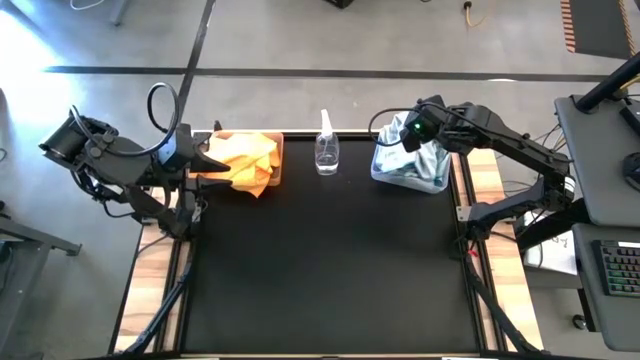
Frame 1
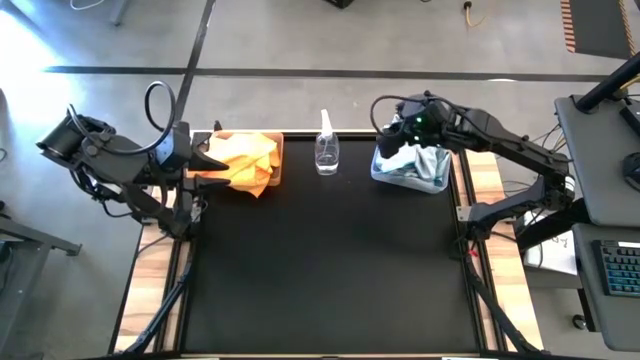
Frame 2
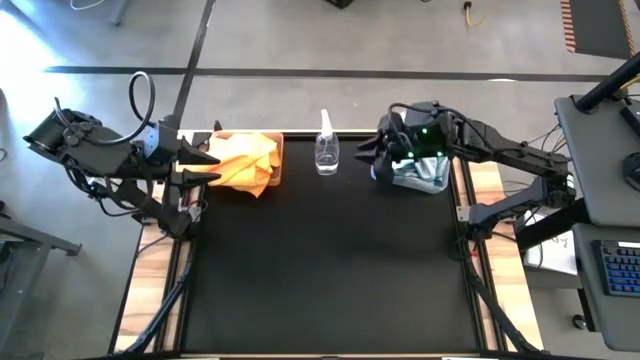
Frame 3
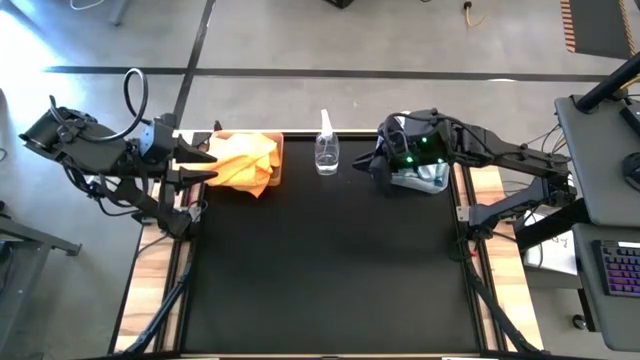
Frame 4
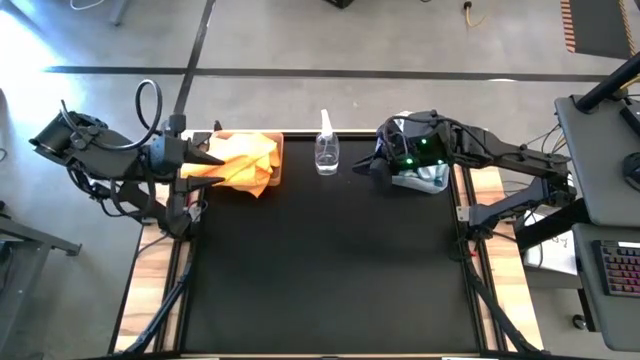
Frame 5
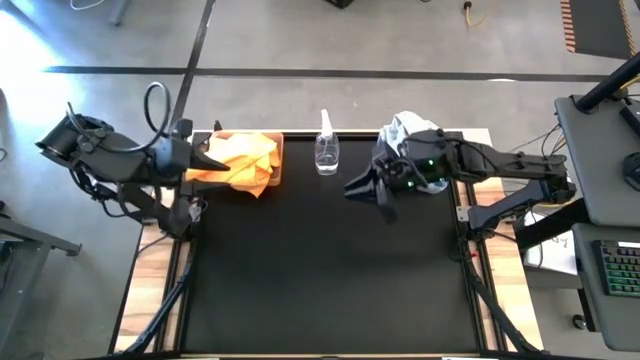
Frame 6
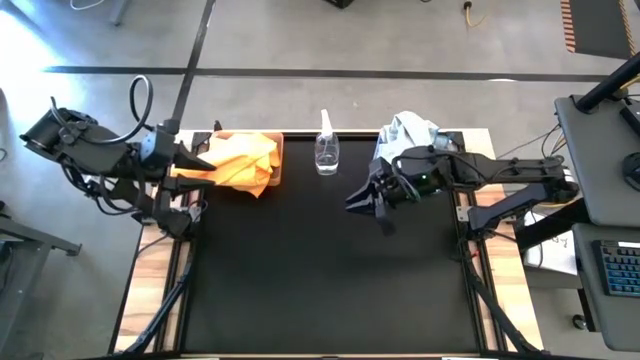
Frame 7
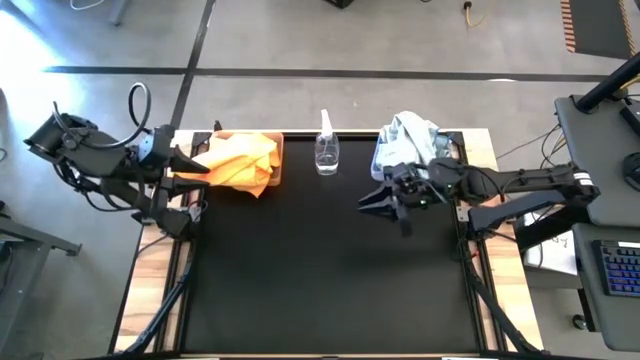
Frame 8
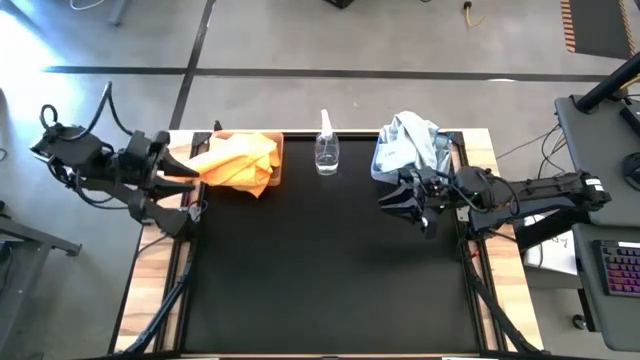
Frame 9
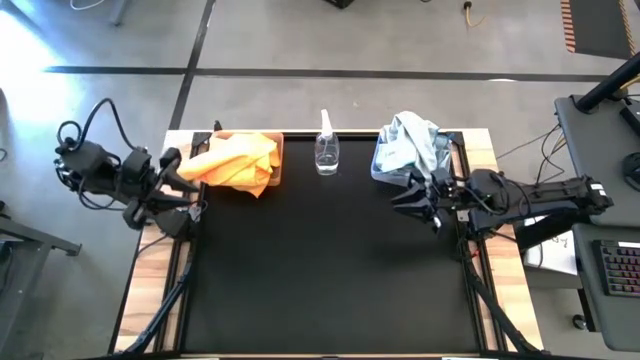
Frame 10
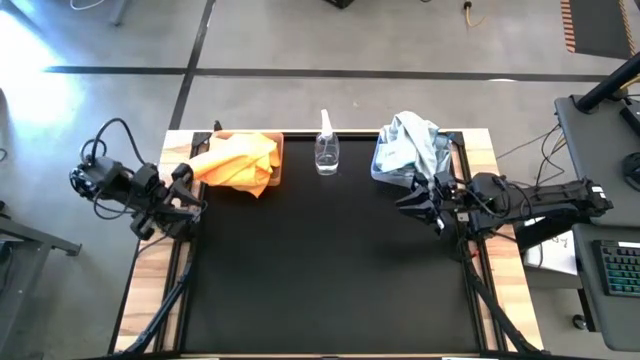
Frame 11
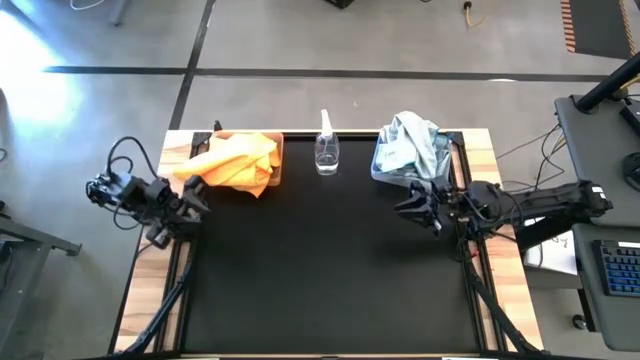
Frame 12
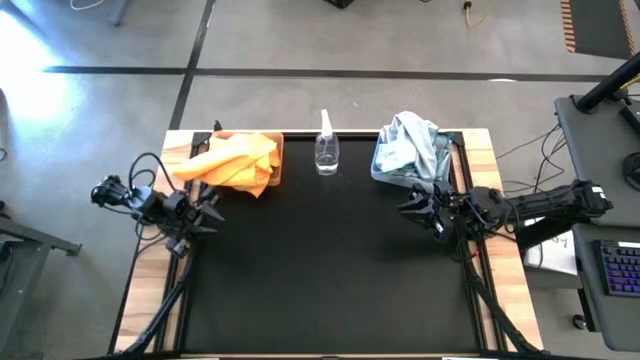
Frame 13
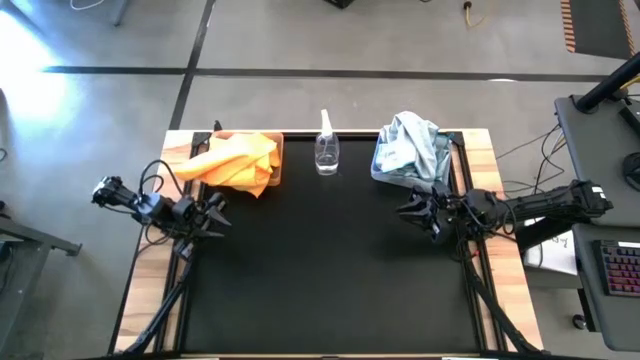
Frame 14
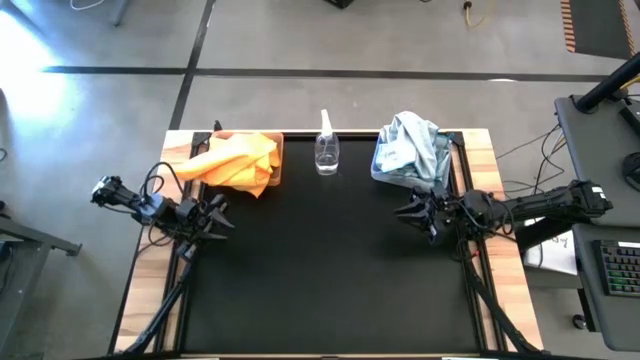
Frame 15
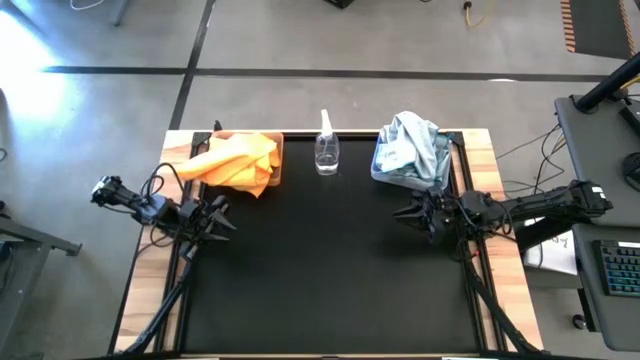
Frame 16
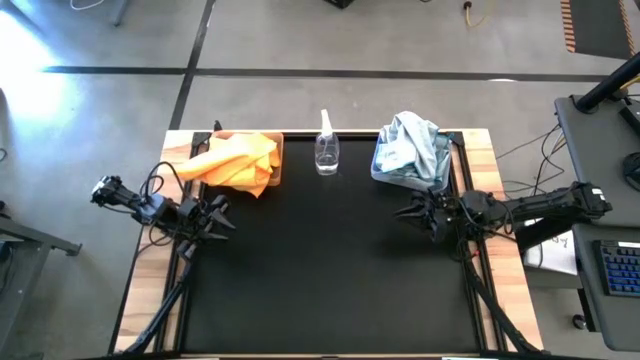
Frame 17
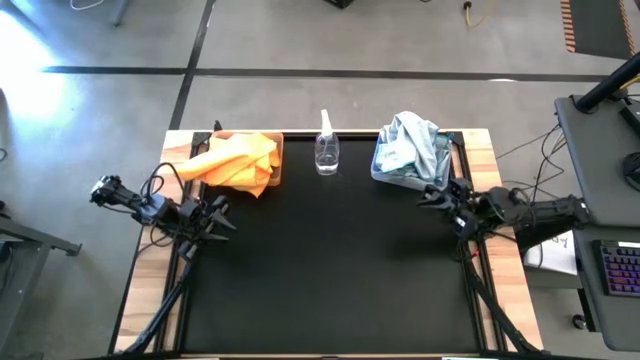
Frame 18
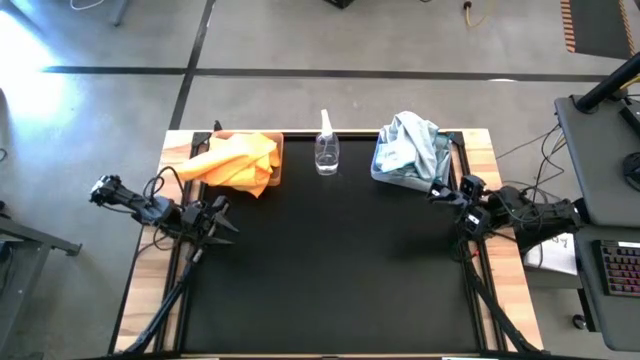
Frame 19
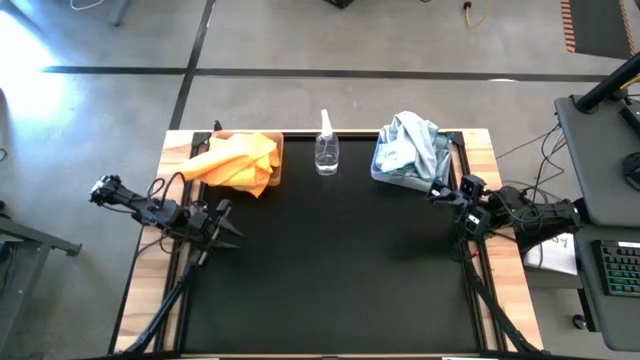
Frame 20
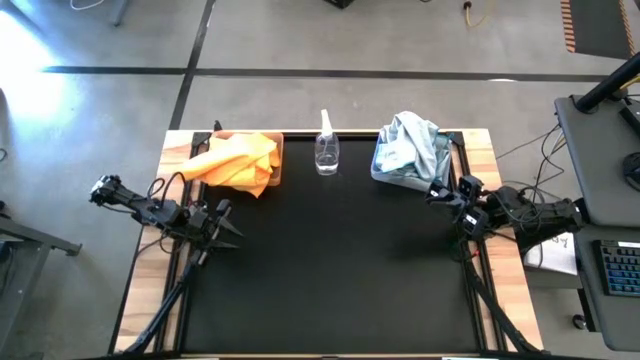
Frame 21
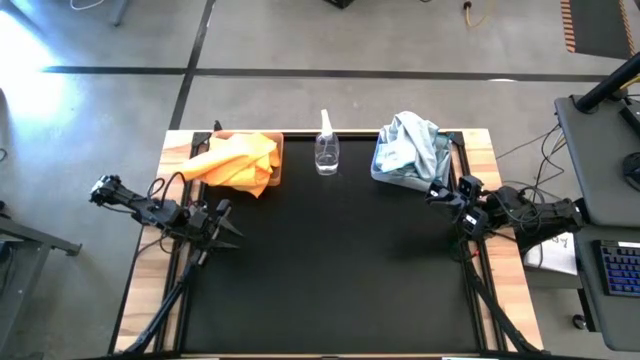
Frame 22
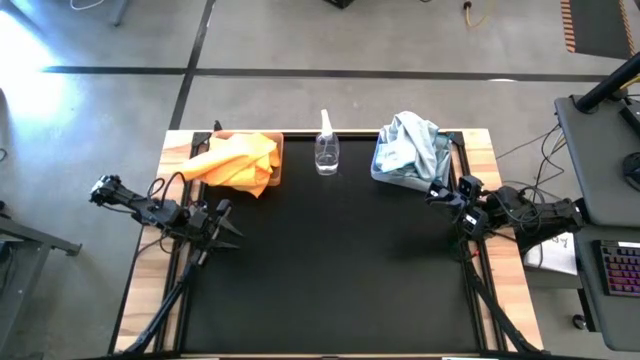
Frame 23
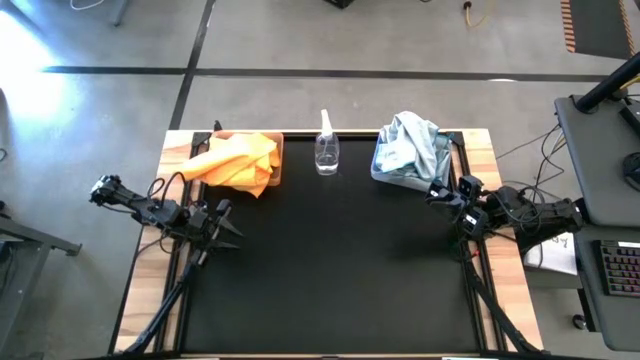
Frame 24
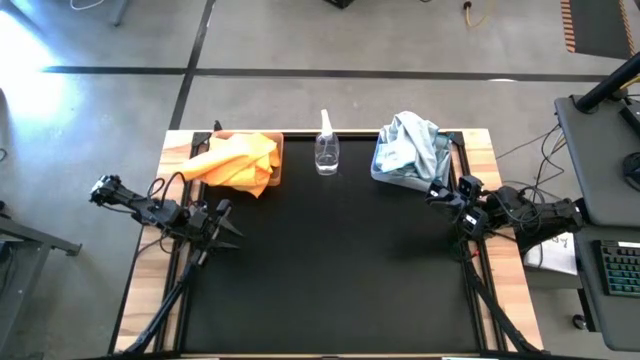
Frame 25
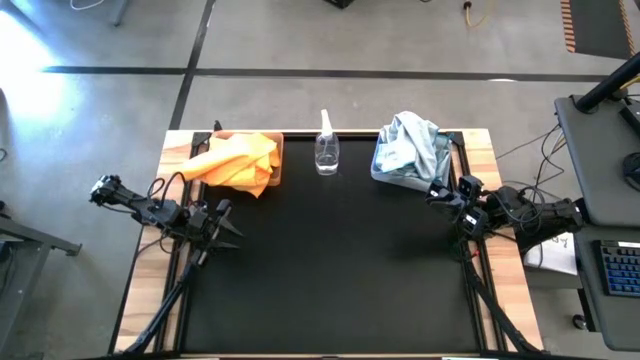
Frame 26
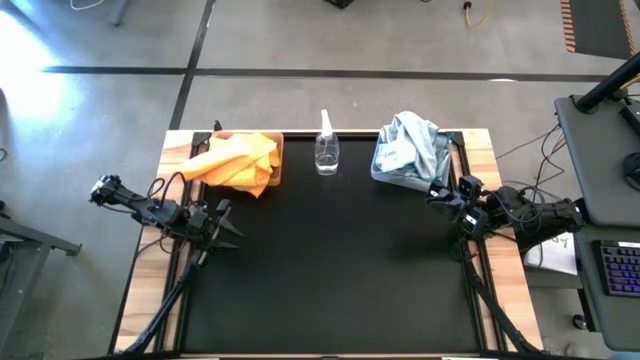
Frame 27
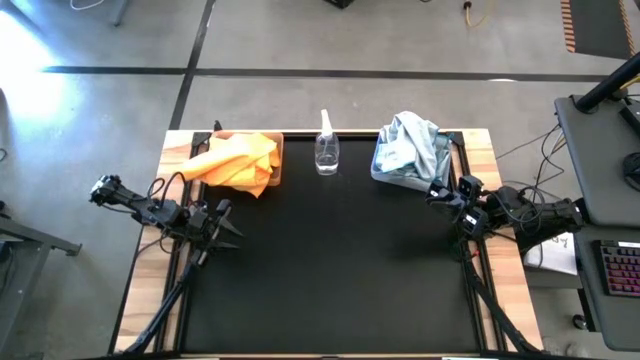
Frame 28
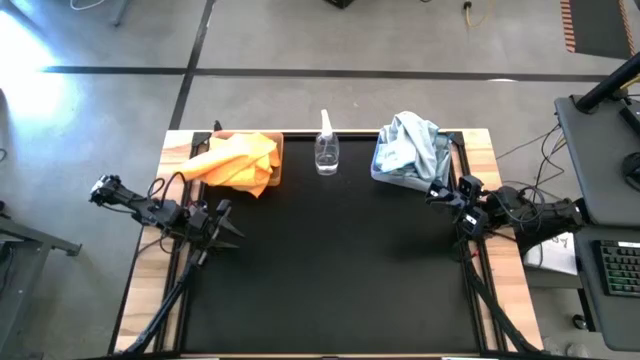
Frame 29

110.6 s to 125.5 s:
Task: Sort microfiber towel by color & place in baskets
Return to Home Position

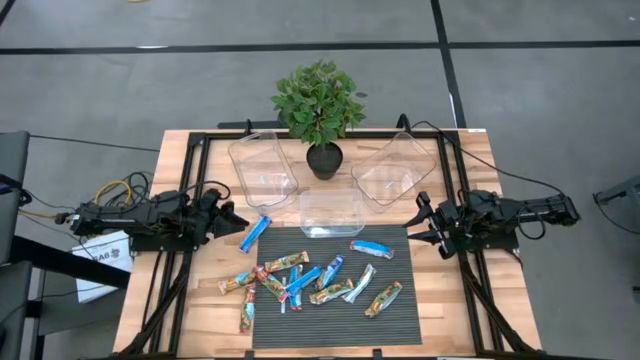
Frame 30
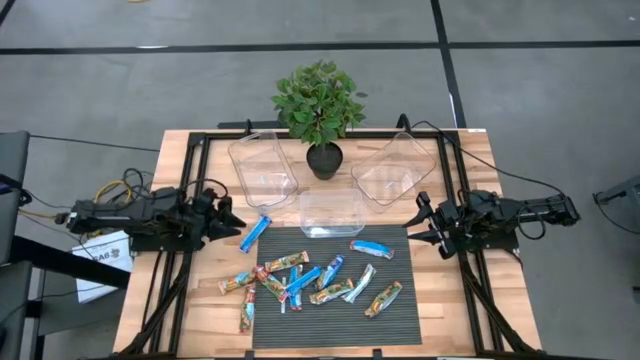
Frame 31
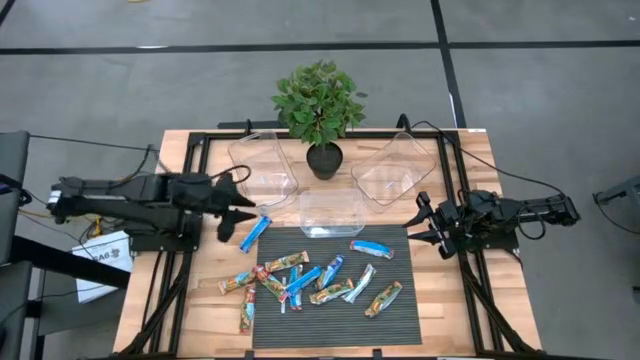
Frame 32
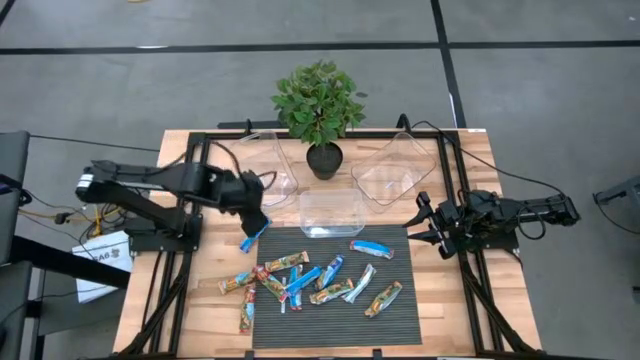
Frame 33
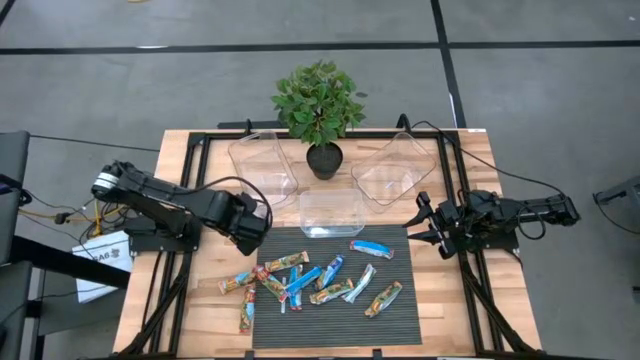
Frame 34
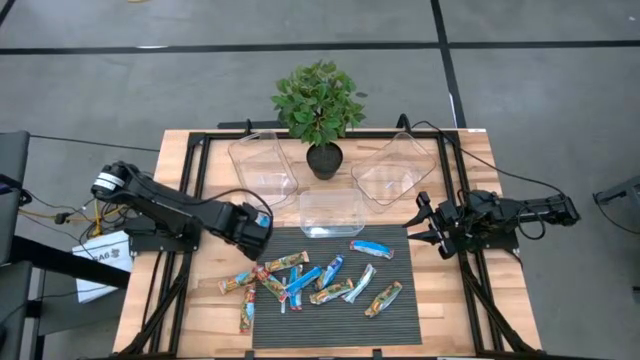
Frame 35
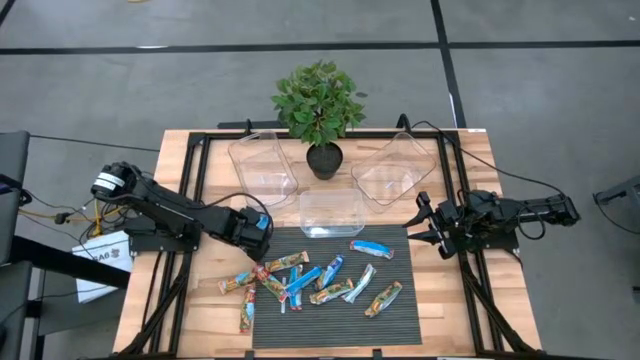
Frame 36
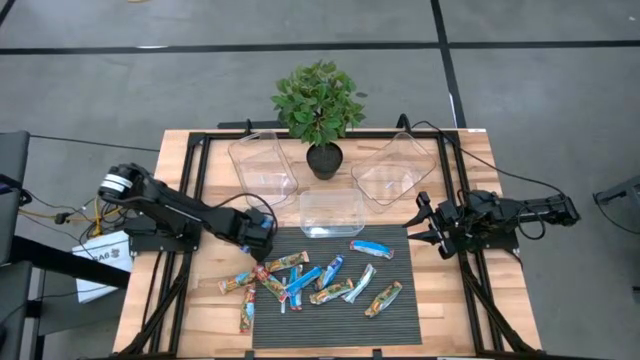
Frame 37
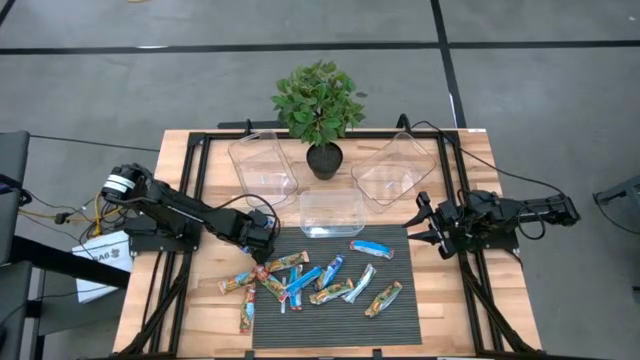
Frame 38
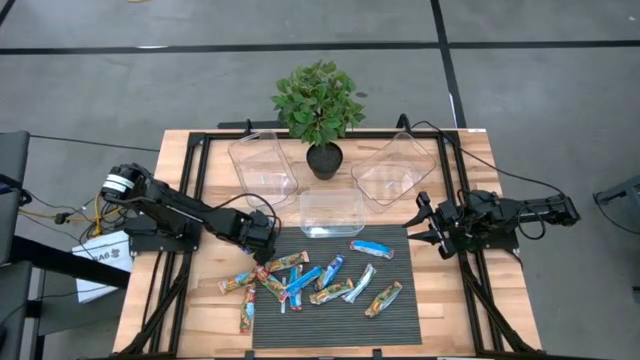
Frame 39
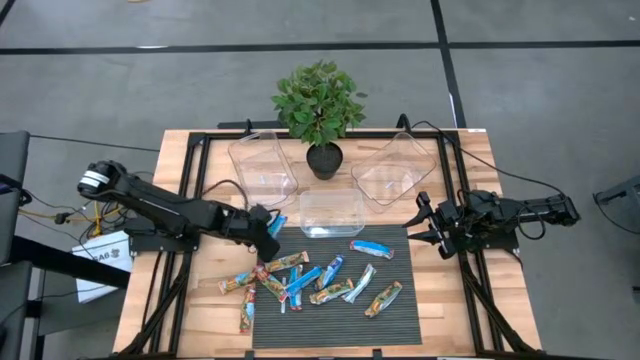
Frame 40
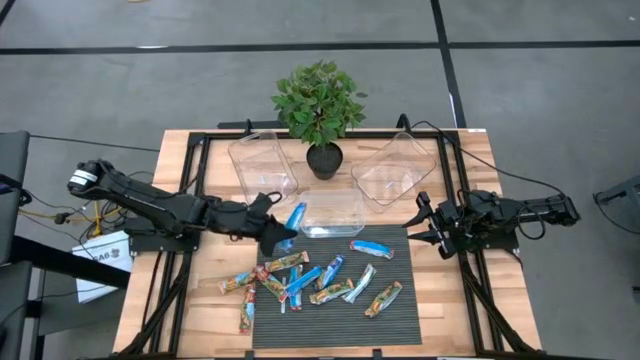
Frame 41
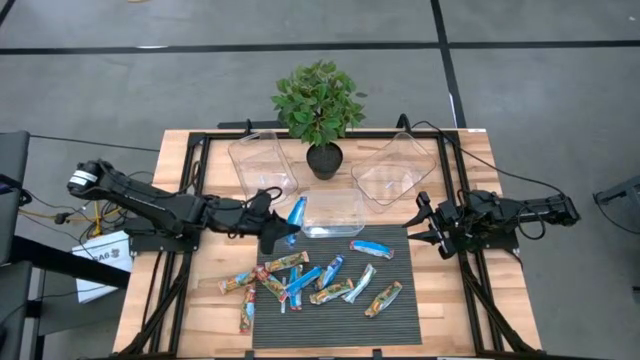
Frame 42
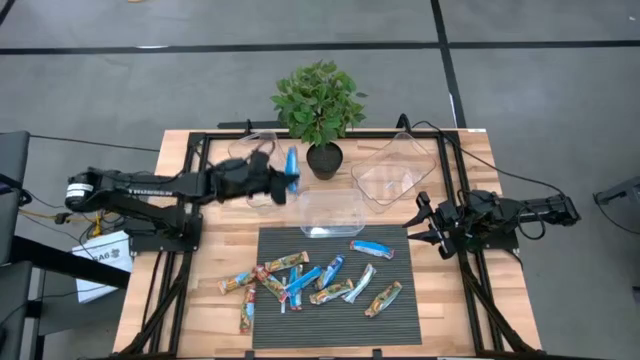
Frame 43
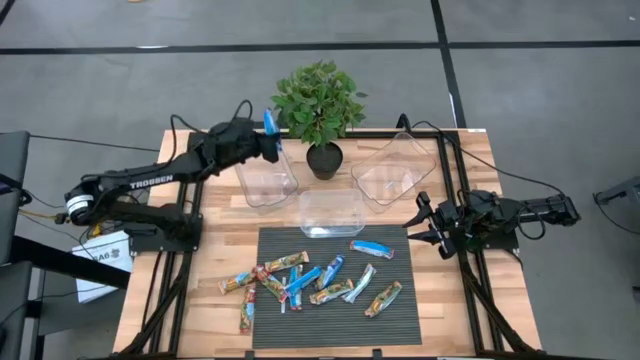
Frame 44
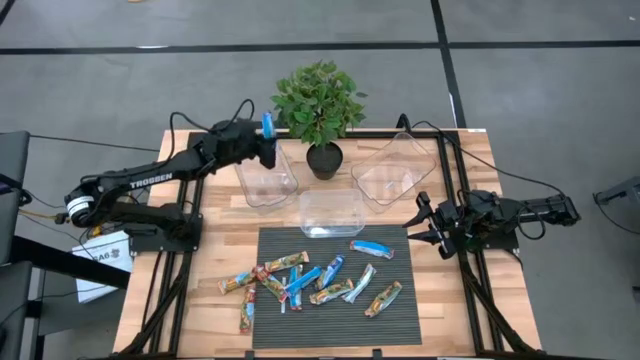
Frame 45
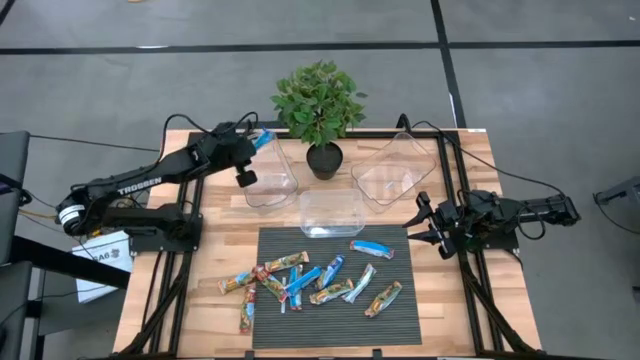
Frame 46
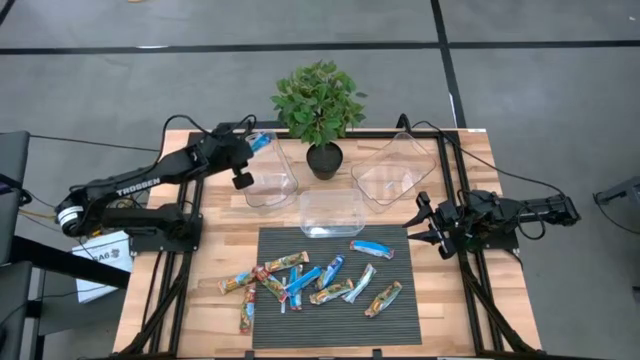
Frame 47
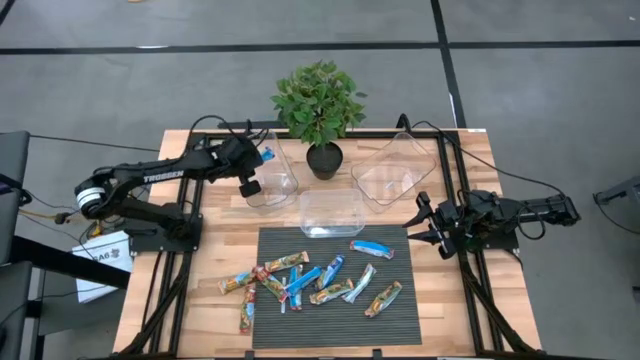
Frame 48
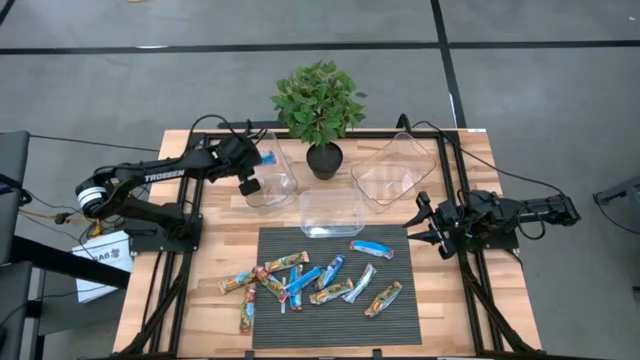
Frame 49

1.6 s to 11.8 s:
Task: Pick and place Granola Bars by type
Put the blue granola bar into the left transparent bin
